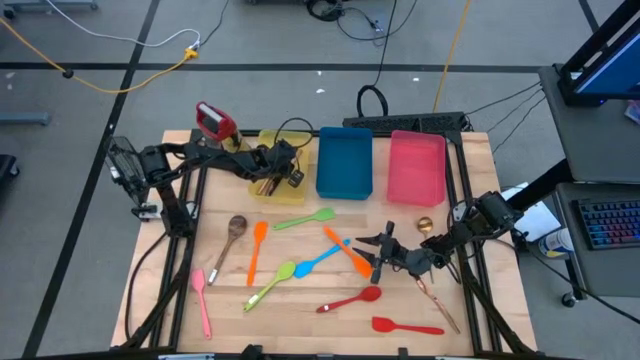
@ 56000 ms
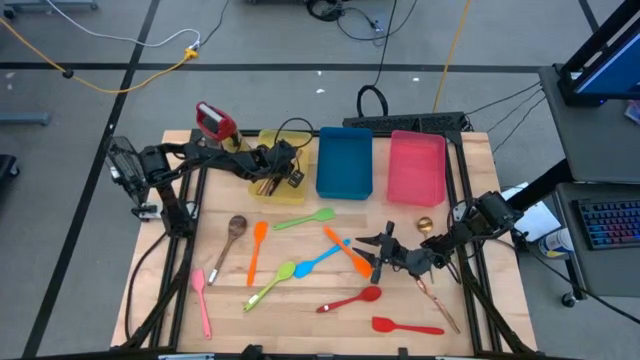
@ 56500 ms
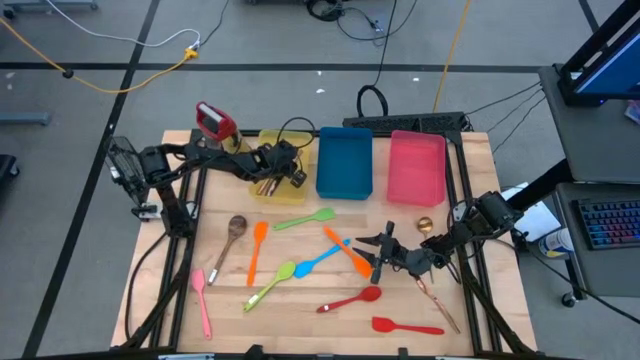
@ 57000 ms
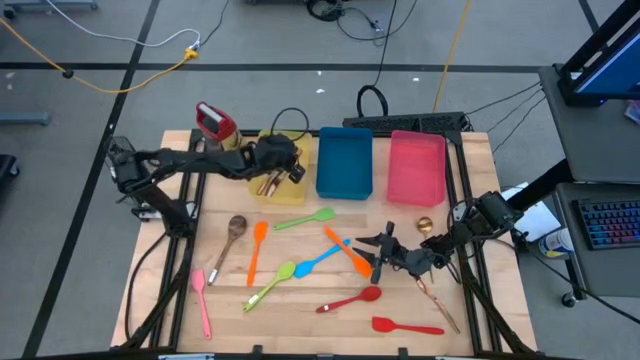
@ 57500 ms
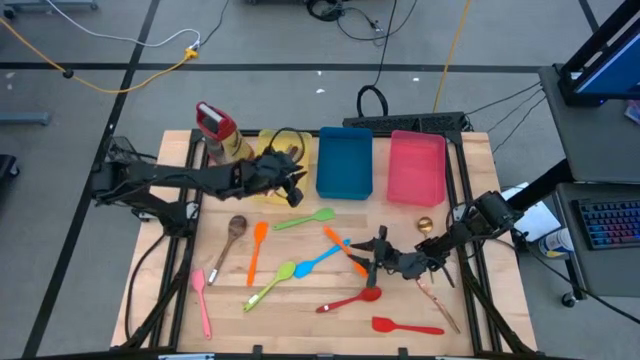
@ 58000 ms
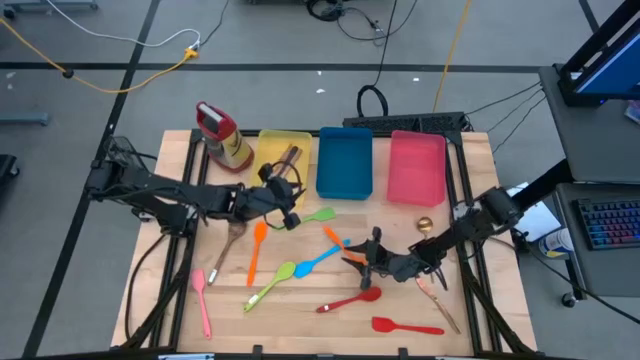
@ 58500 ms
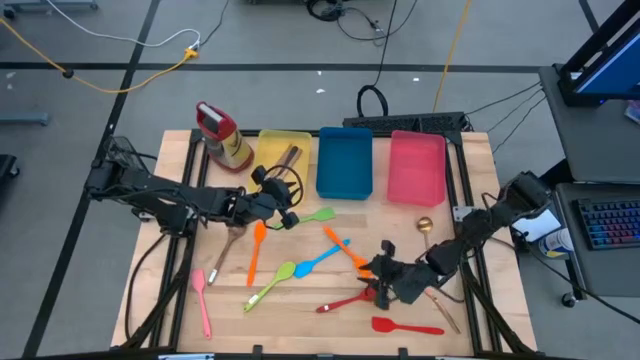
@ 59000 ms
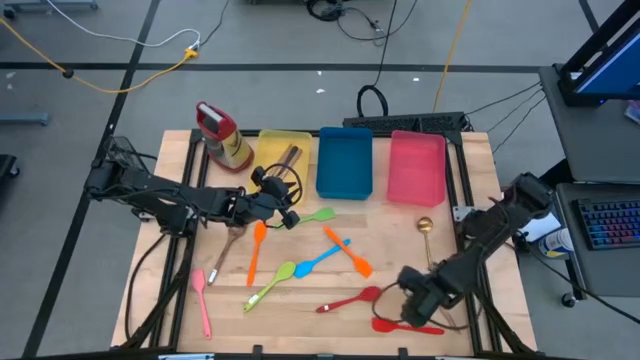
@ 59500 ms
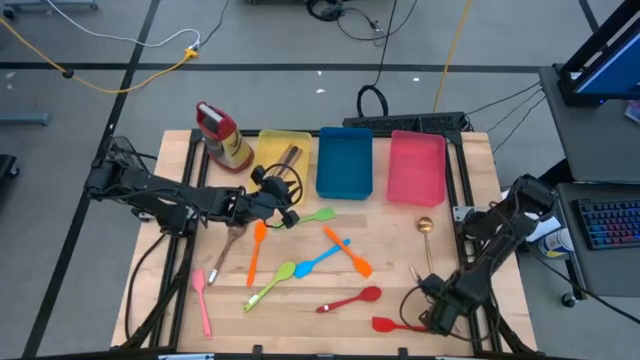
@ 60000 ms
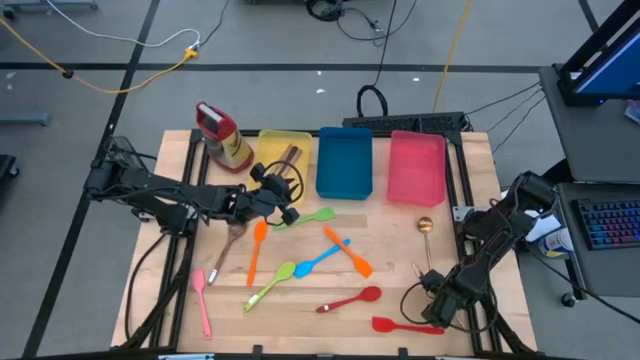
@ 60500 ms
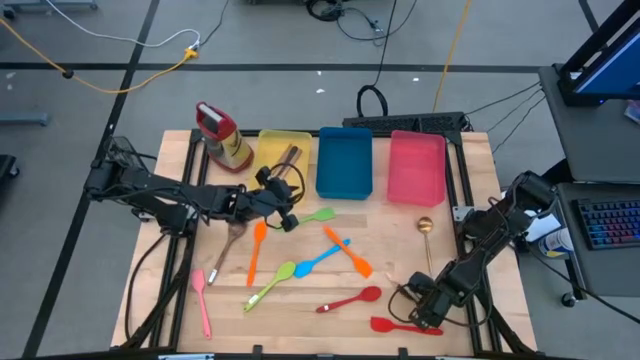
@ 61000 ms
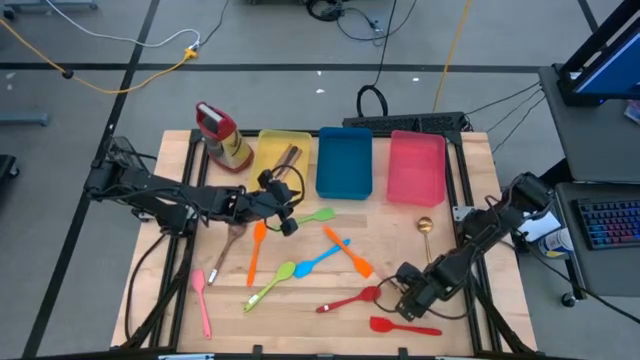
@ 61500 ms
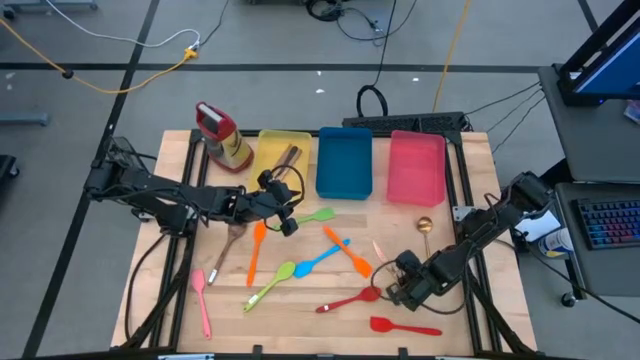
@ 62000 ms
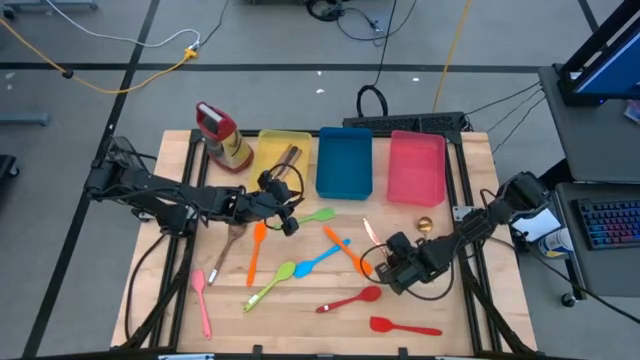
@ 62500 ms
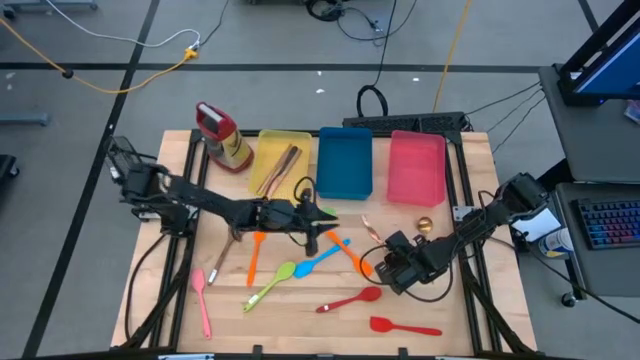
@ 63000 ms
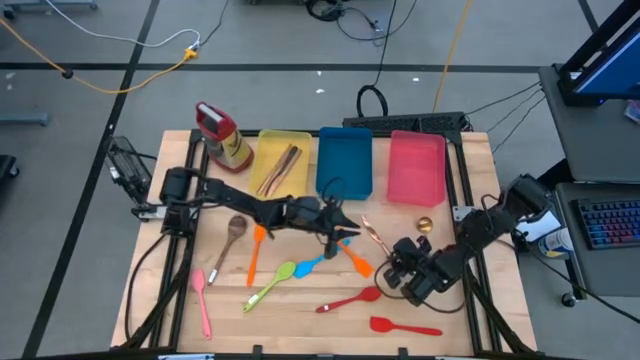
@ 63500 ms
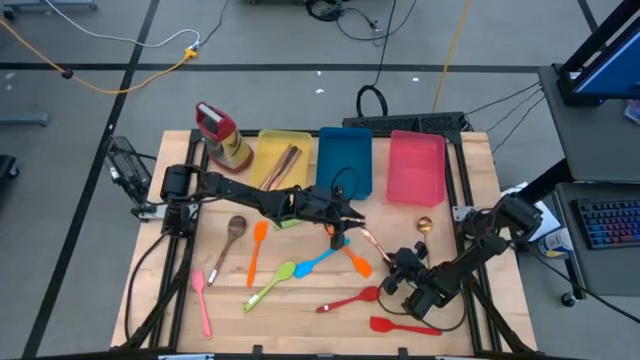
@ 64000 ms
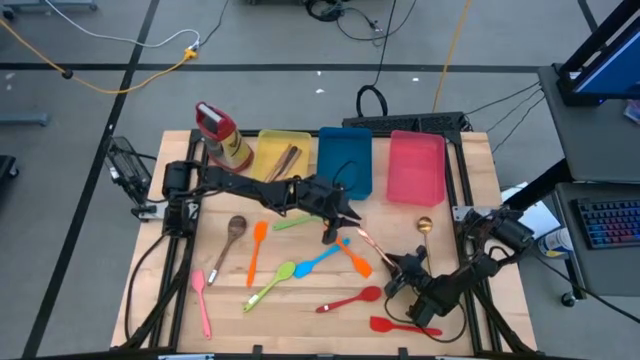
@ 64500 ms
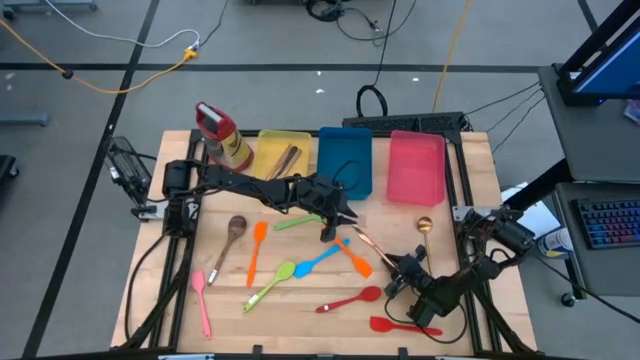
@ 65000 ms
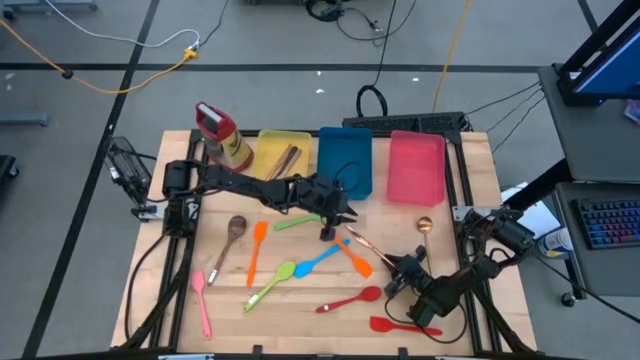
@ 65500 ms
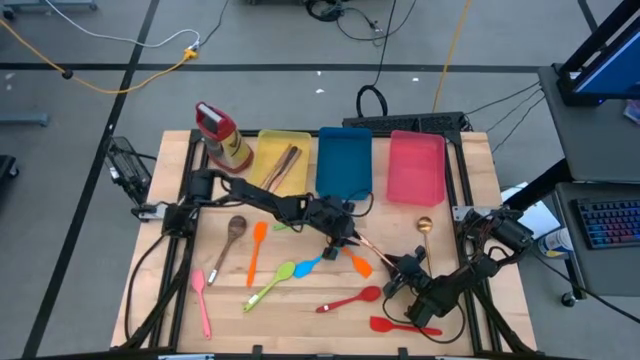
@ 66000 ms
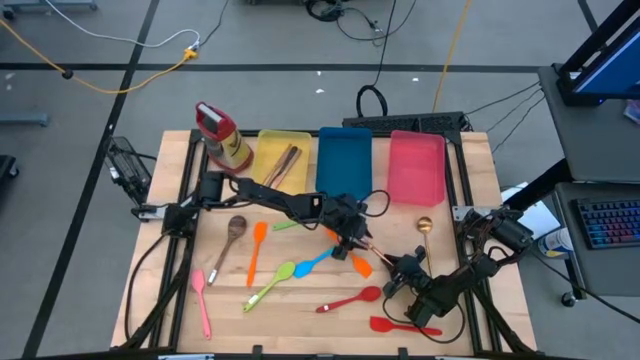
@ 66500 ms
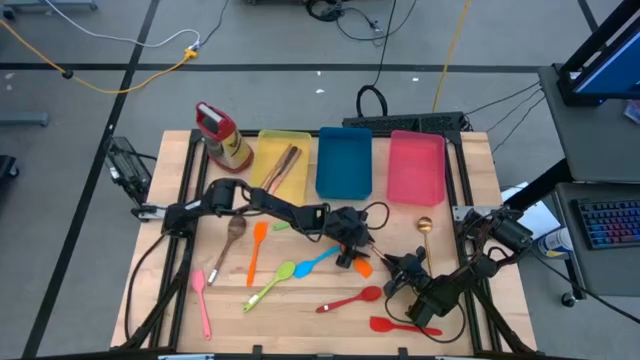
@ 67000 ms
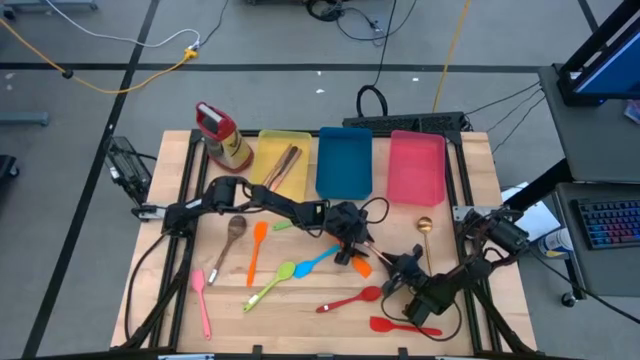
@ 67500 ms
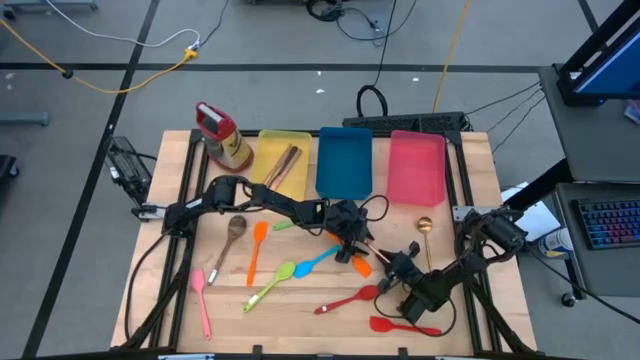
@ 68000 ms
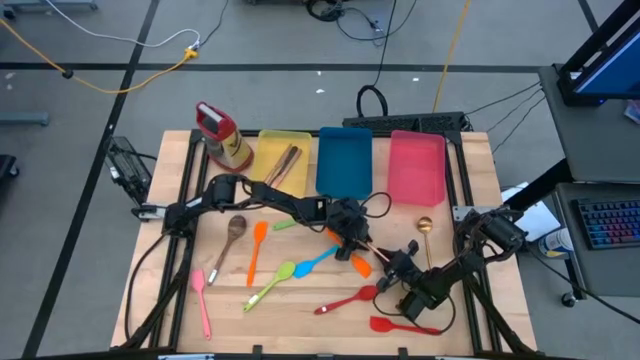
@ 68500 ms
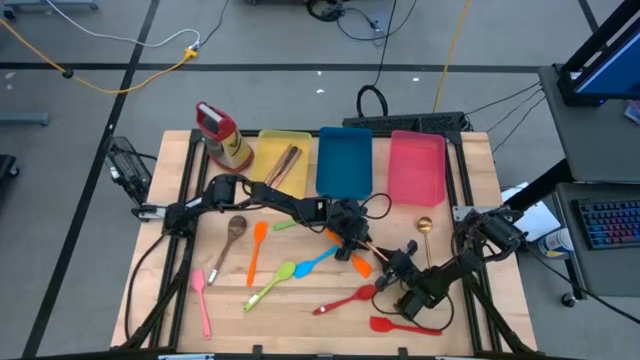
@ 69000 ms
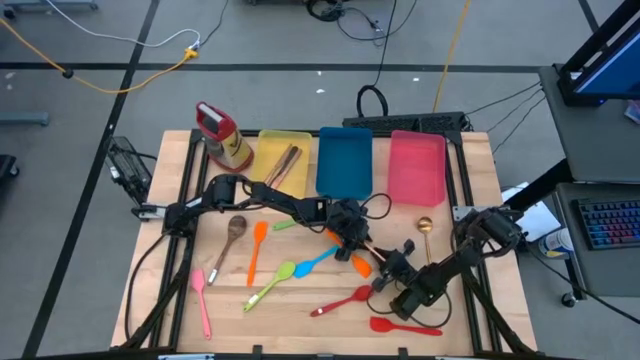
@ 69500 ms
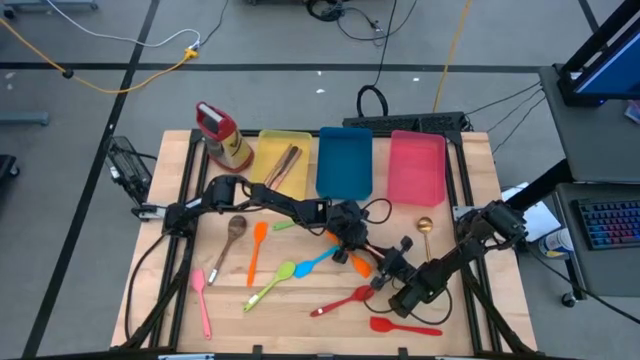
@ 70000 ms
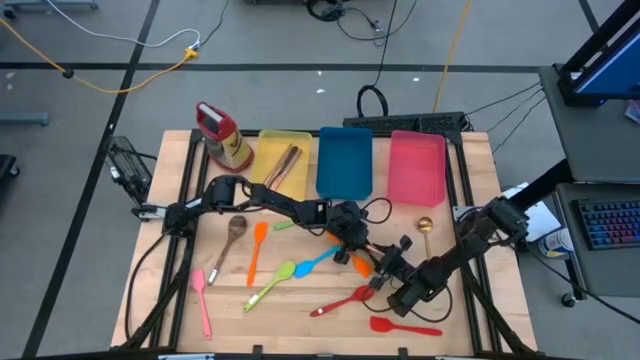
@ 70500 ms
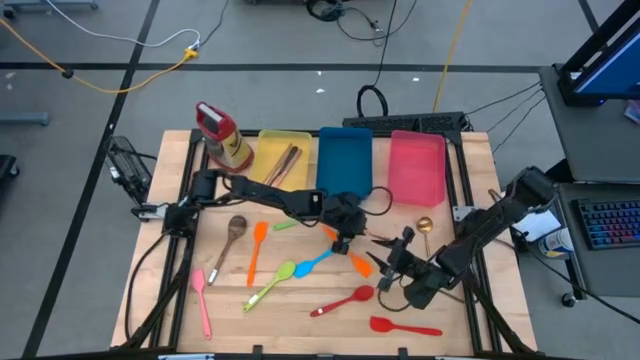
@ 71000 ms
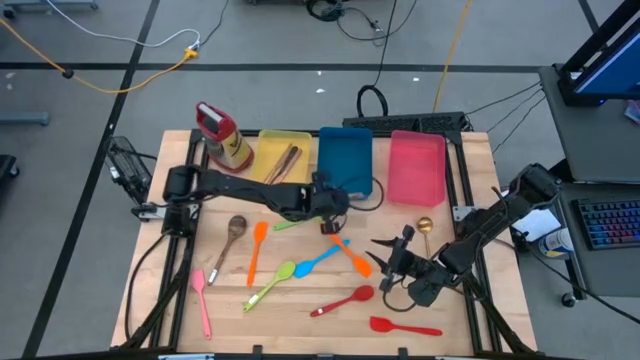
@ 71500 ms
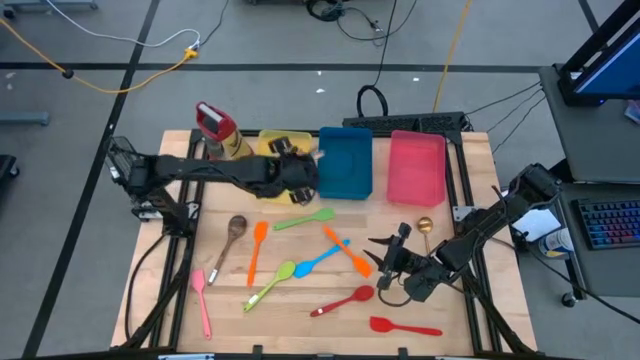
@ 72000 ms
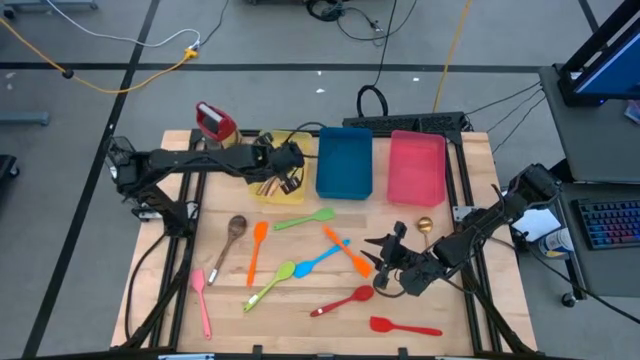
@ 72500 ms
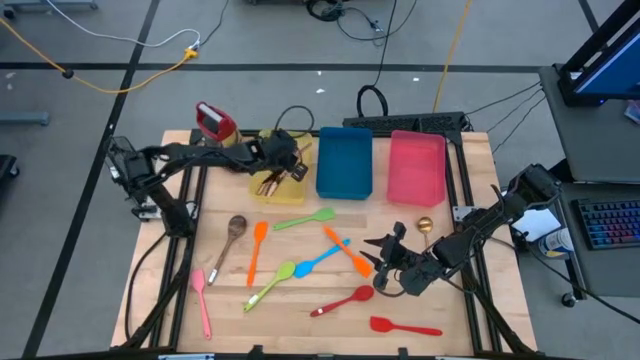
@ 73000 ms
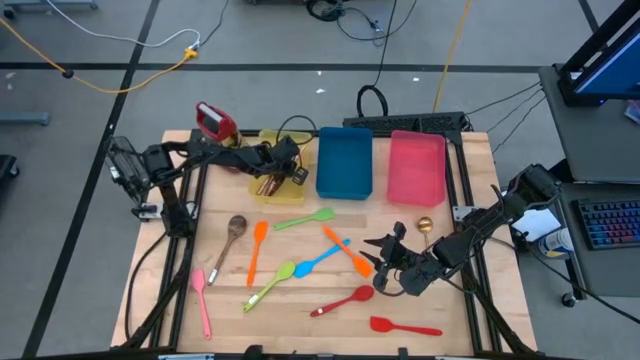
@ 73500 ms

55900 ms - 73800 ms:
Task: Pick & Place Kitchen Items
Put the bronze knife into the yellow bin

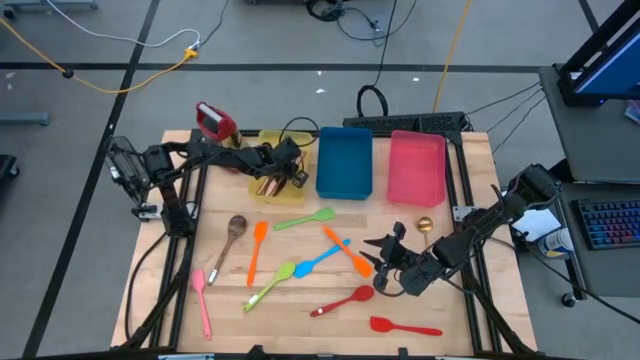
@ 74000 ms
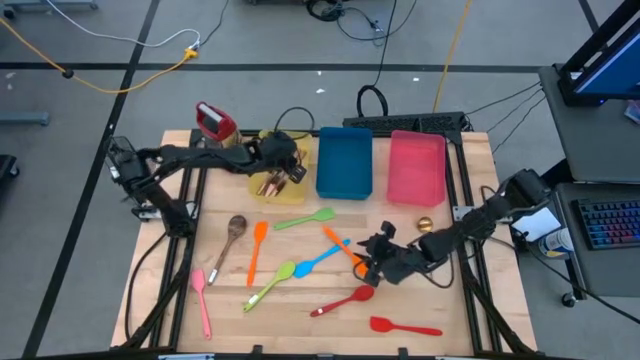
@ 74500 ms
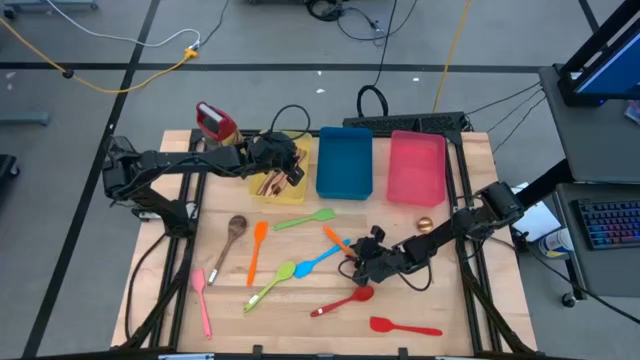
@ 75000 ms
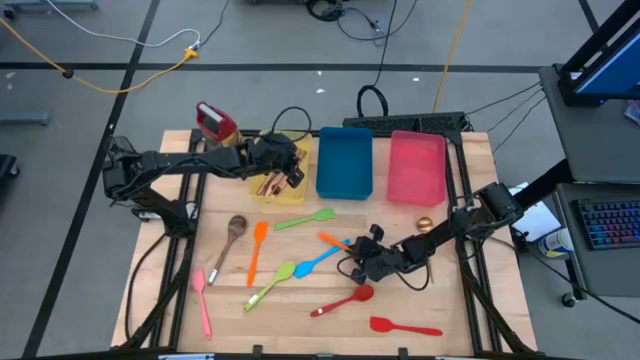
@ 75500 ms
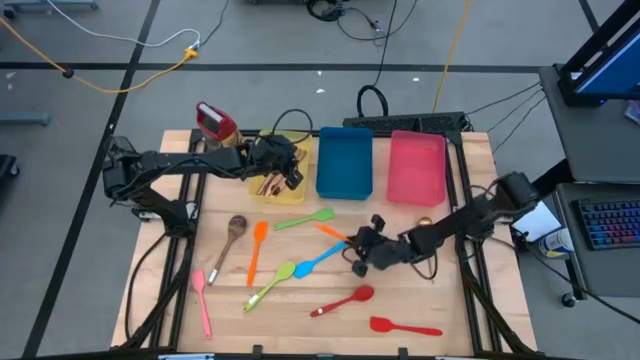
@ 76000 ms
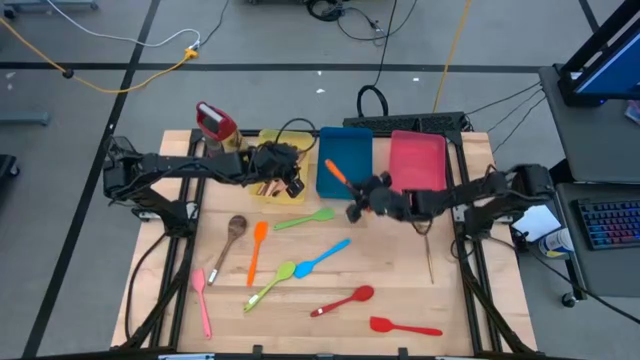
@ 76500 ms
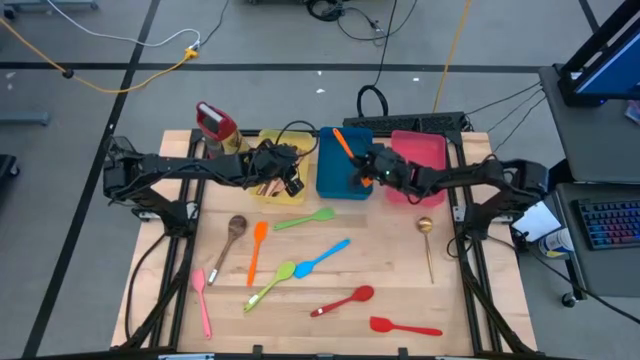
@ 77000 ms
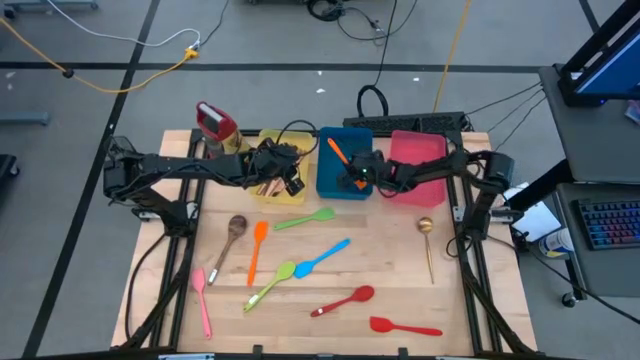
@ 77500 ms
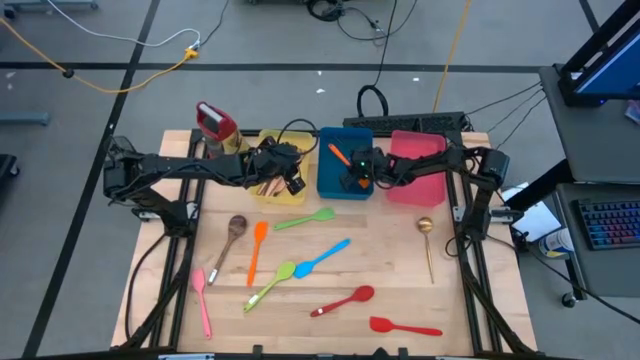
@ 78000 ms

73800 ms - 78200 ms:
Put the right orange spatula into the blue bin
